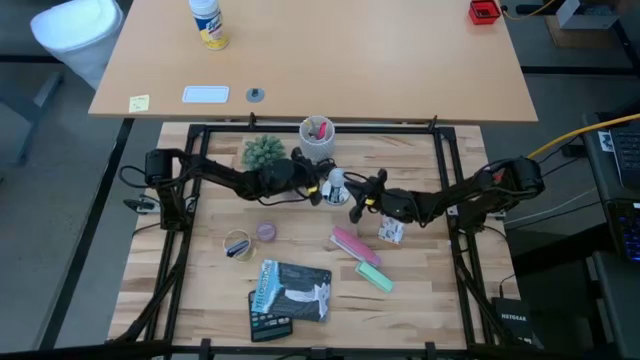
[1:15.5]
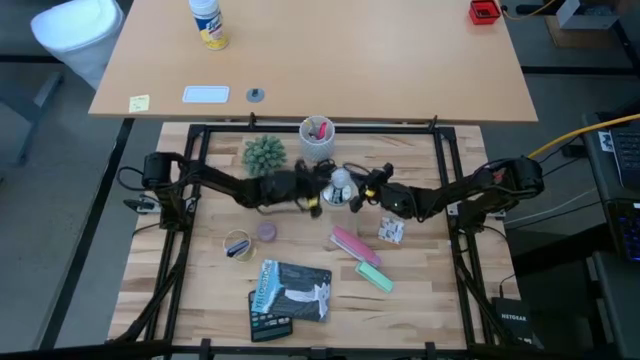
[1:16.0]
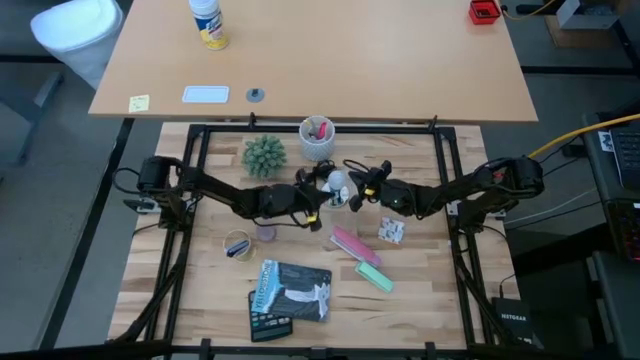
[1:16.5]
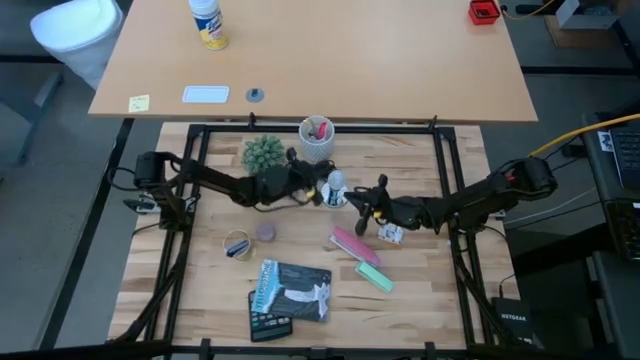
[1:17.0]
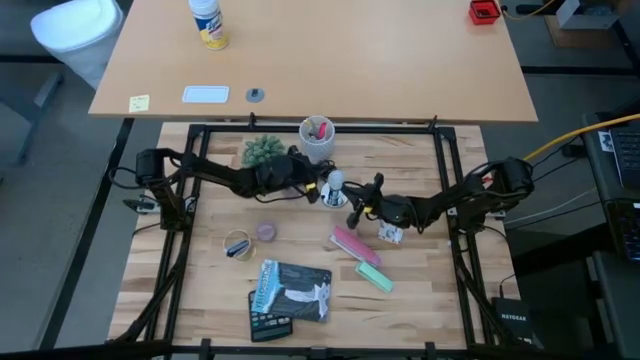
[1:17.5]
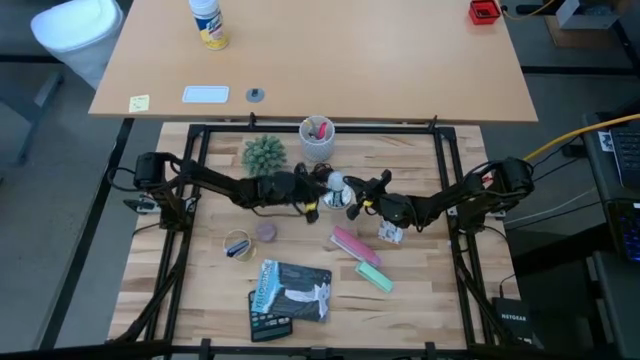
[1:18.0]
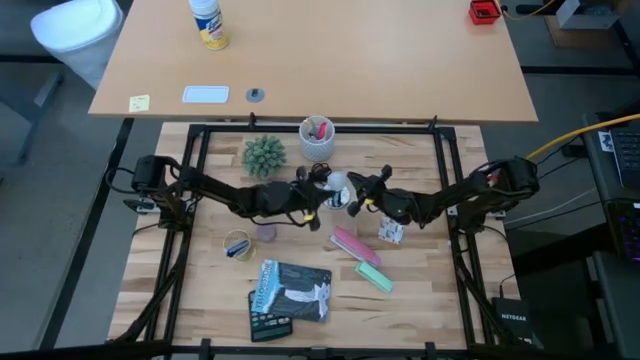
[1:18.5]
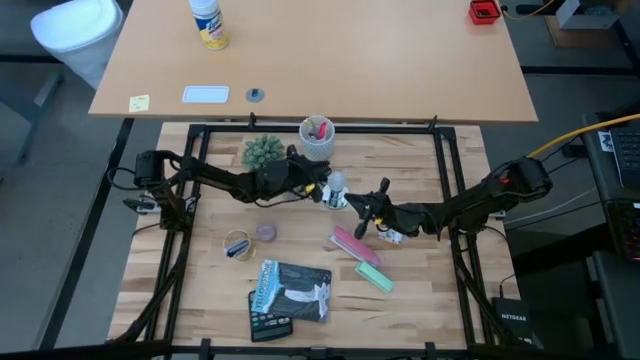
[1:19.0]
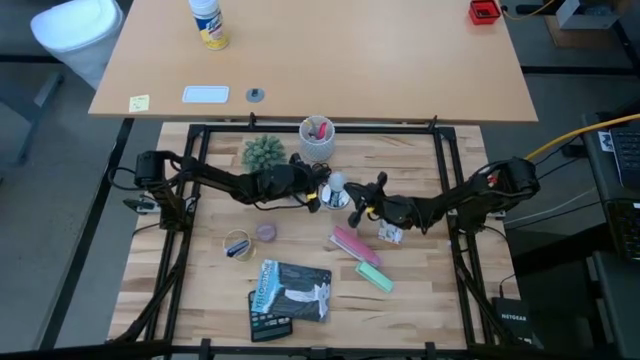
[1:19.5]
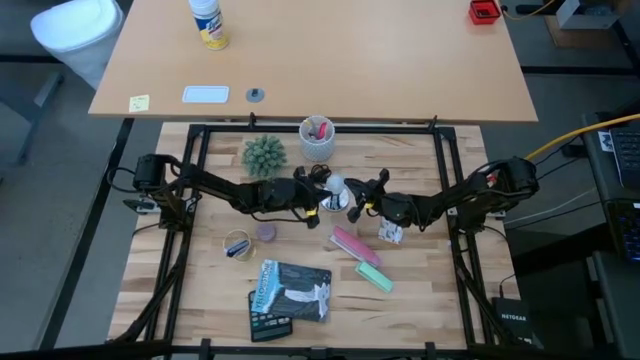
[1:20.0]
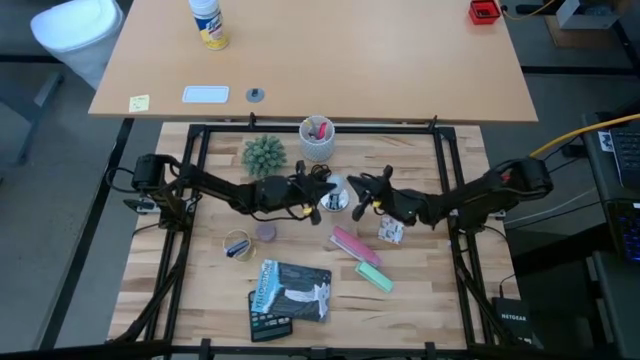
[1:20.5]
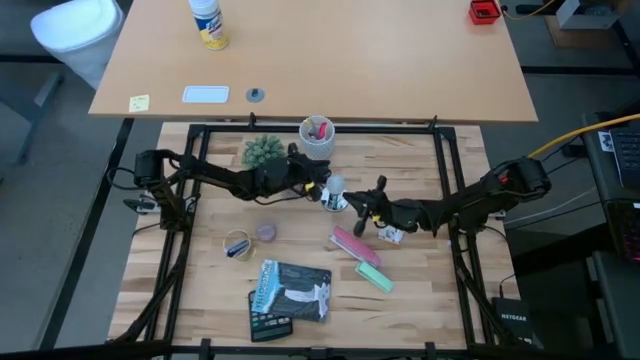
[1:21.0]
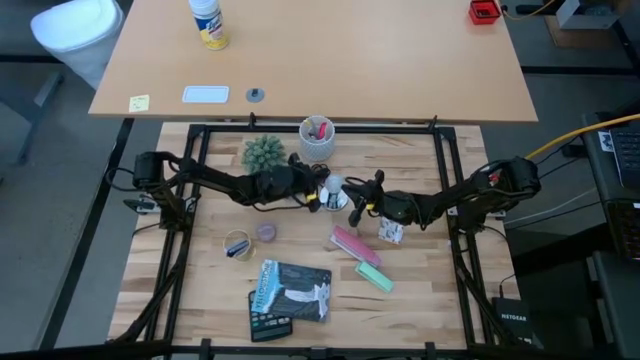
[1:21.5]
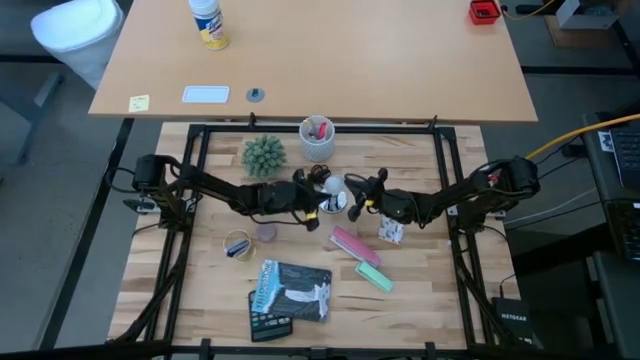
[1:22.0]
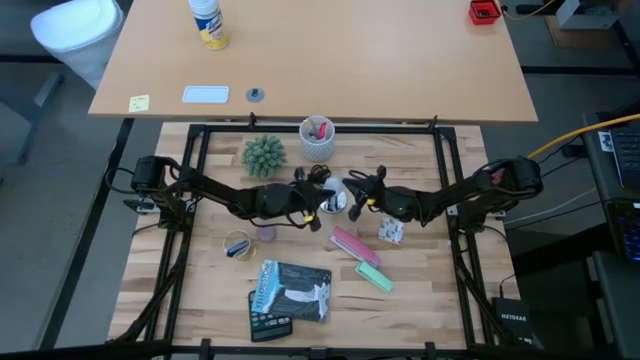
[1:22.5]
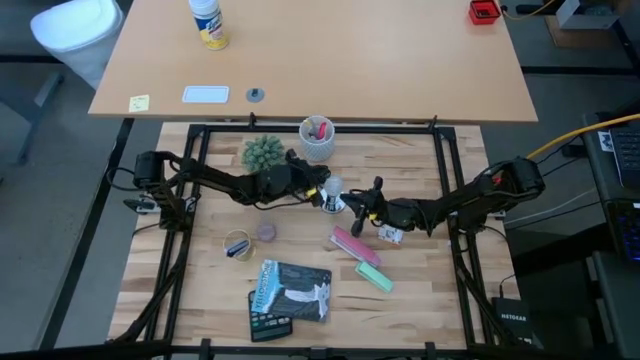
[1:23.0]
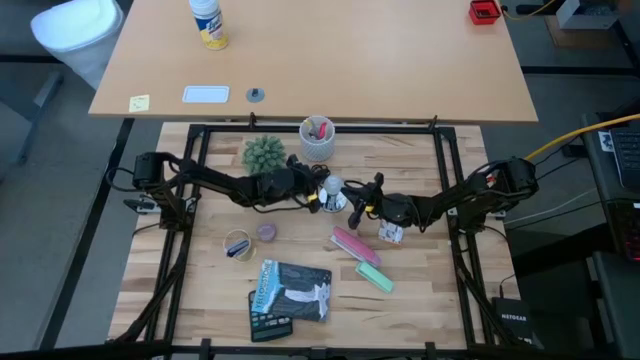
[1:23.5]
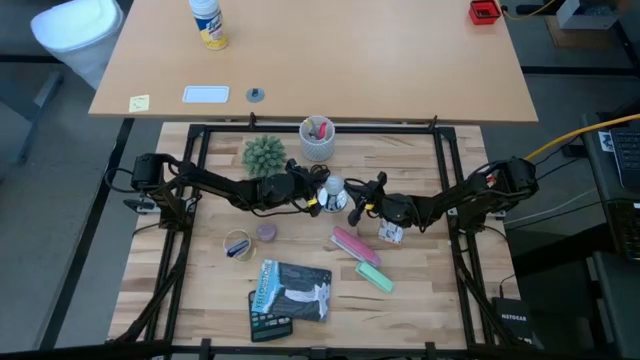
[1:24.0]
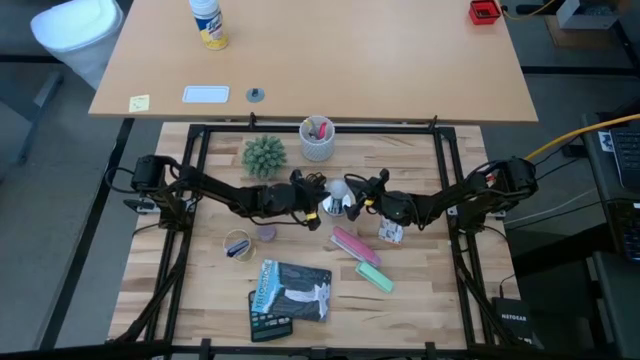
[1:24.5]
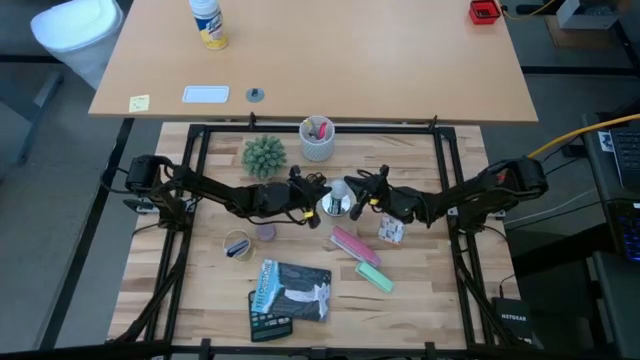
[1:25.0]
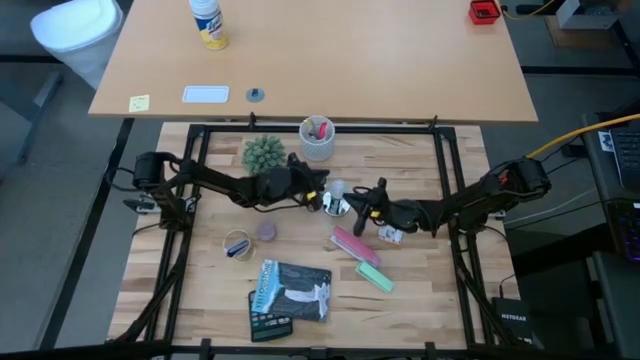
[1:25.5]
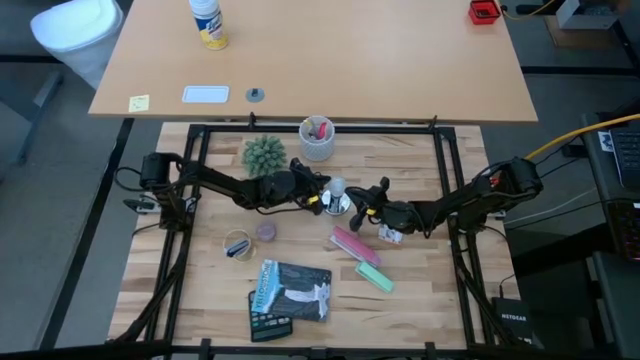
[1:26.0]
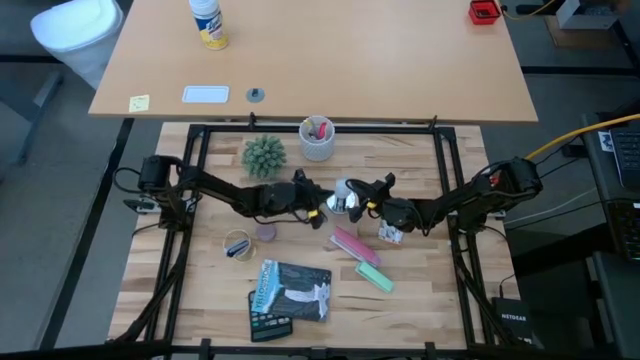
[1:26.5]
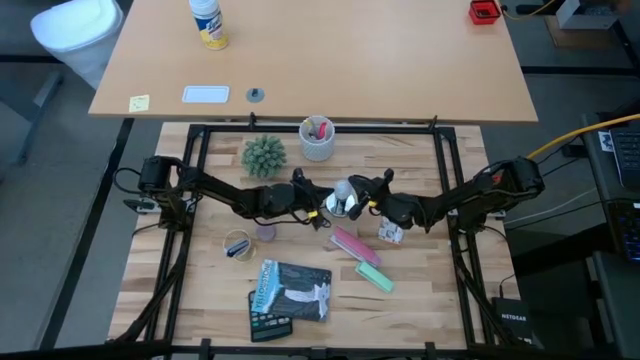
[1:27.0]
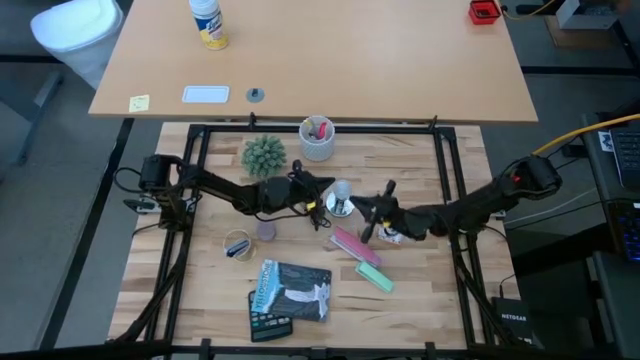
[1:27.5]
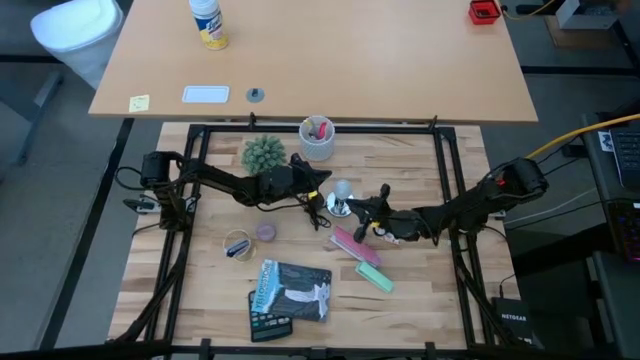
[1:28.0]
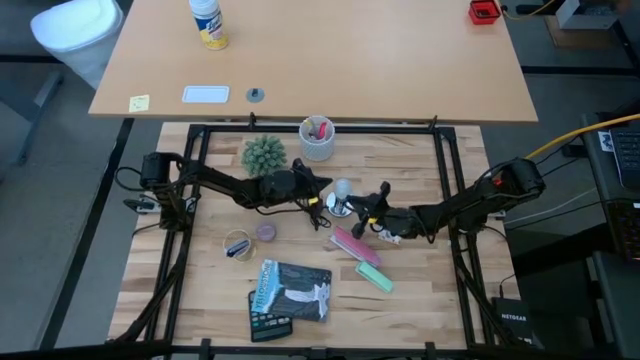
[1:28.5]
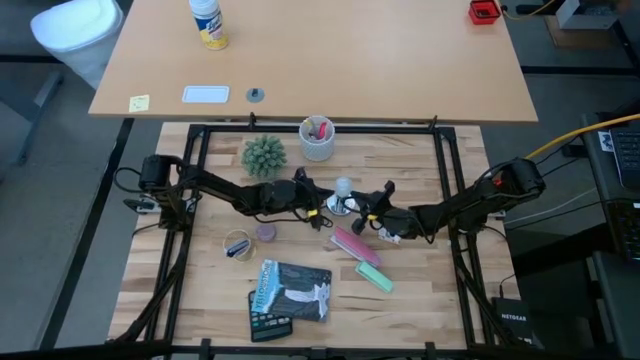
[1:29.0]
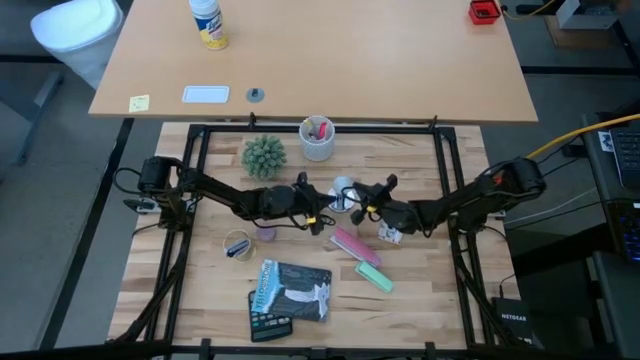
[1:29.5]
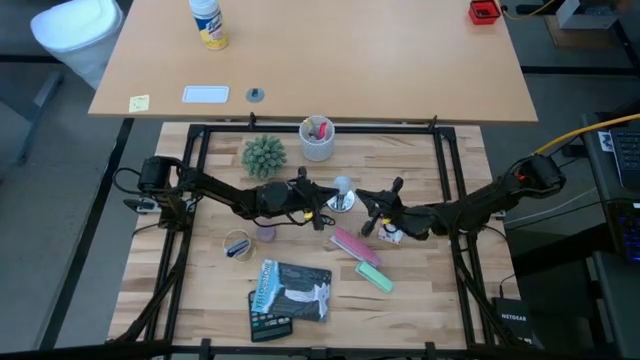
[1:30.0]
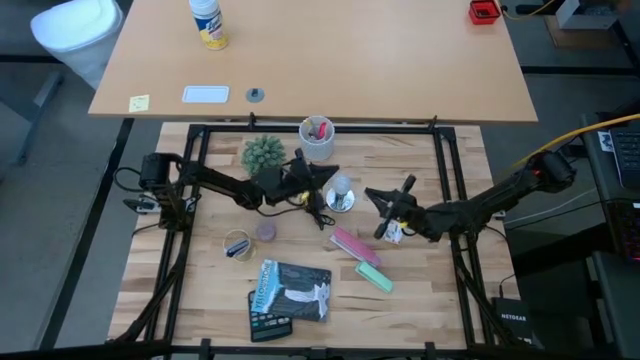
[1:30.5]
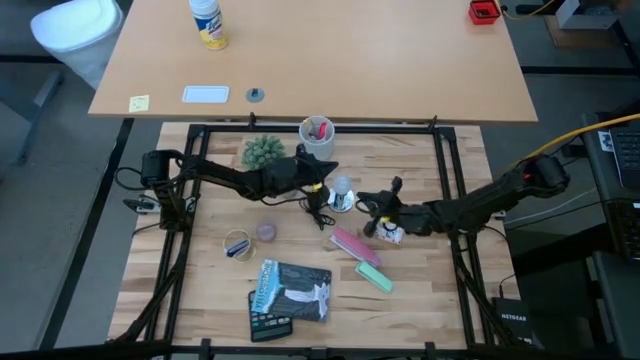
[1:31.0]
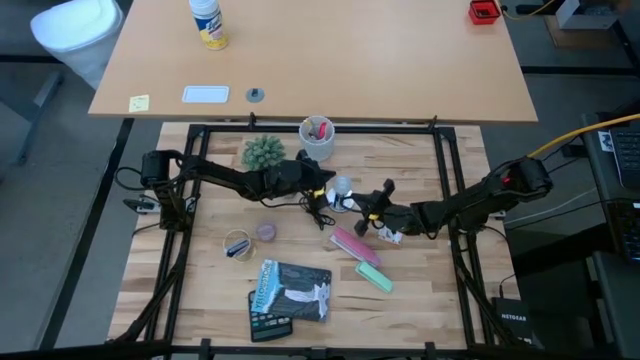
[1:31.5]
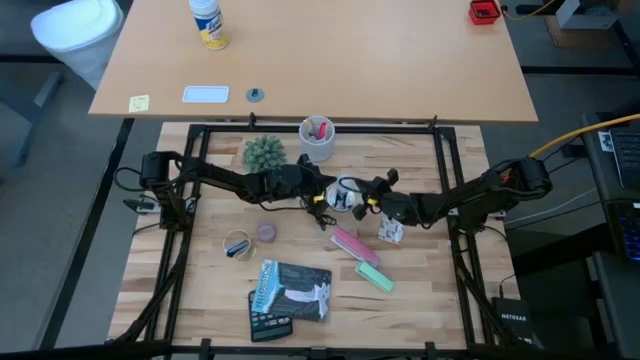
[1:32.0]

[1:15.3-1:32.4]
Task: Screw lightbulb
Remove the lightbulb from the lamp

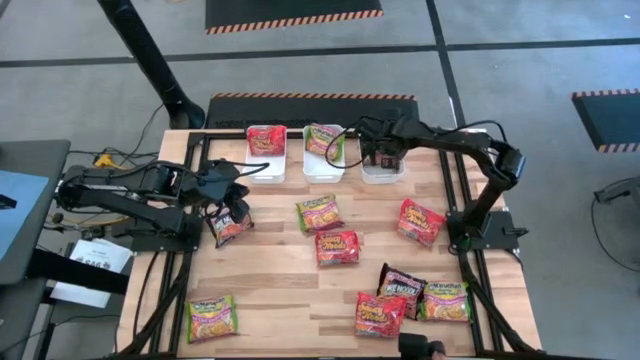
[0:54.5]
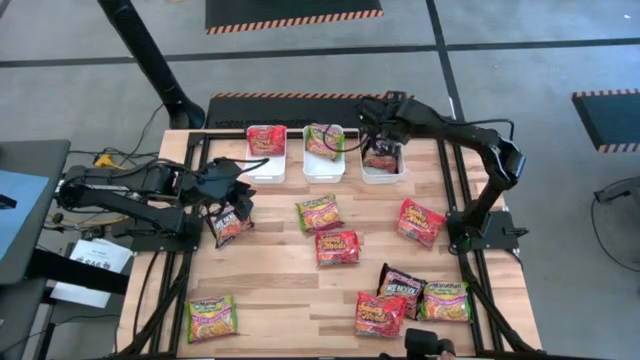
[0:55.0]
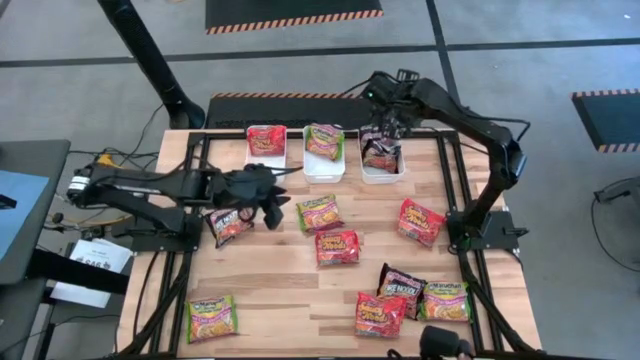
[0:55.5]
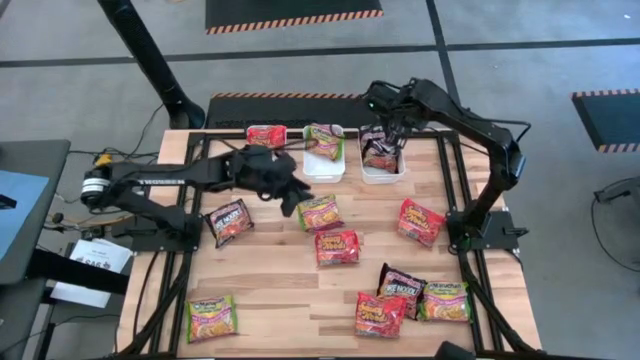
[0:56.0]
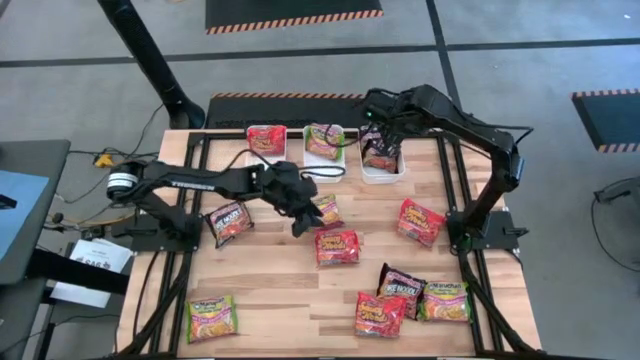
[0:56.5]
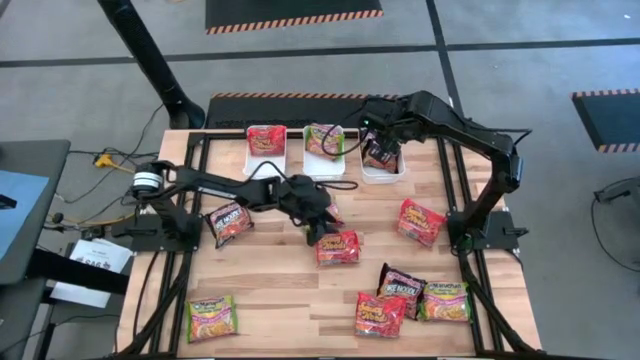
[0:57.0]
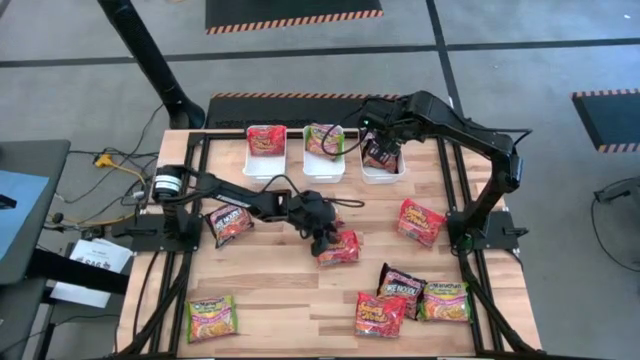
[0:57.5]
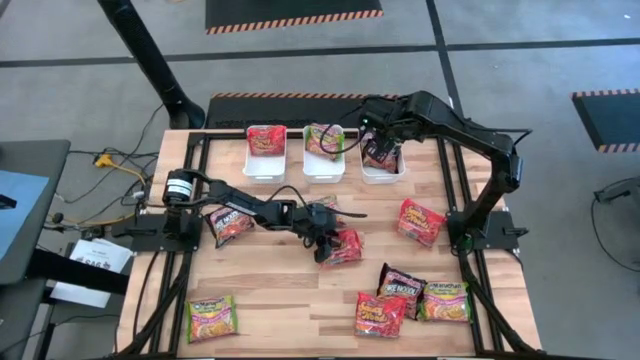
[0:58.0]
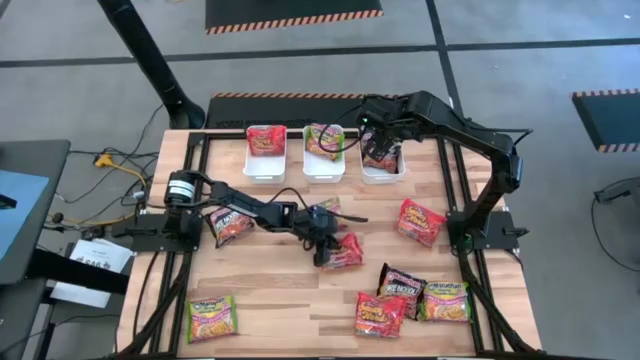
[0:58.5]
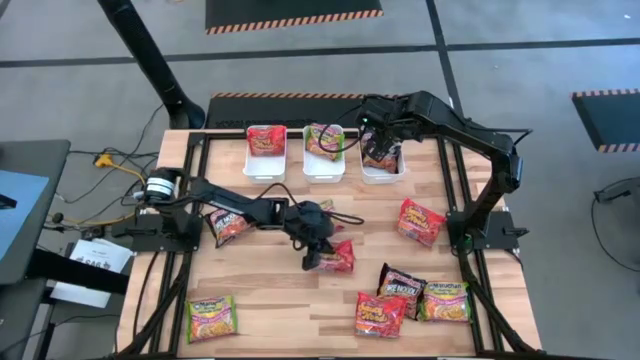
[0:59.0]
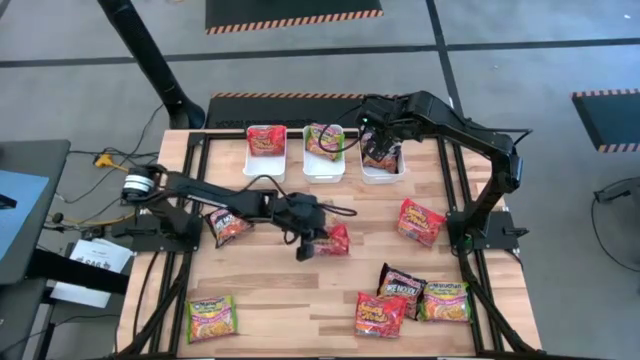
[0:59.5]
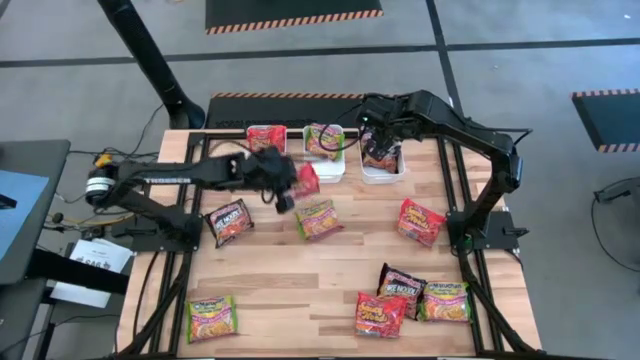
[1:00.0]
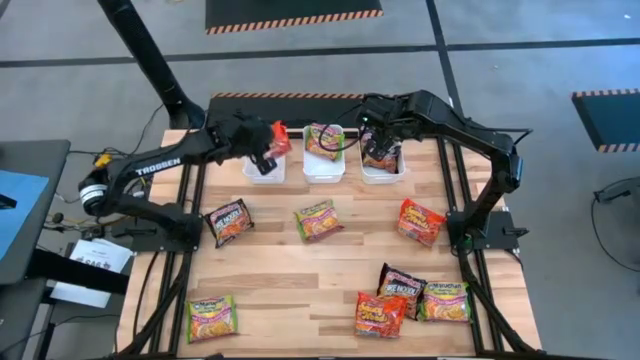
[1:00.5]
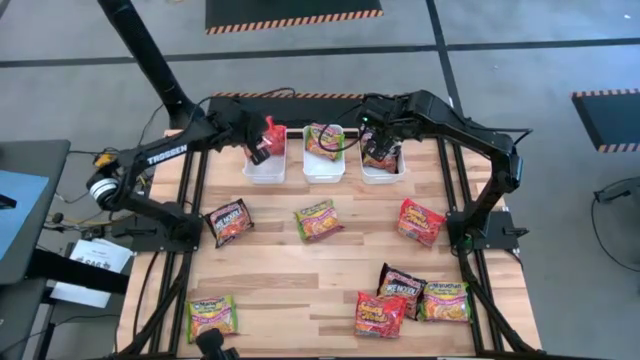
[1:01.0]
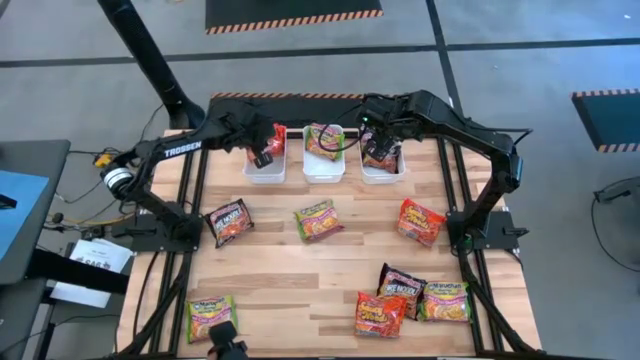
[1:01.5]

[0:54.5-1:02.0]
Task: Sort Maruchan noodles
Put the middle orange noodle pack into the left white bin
